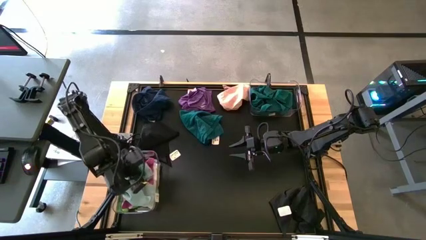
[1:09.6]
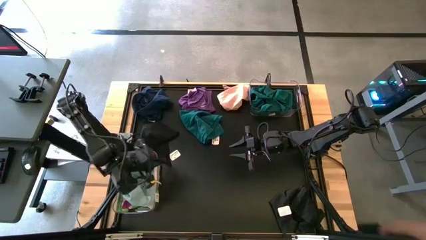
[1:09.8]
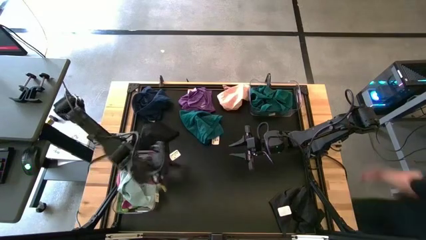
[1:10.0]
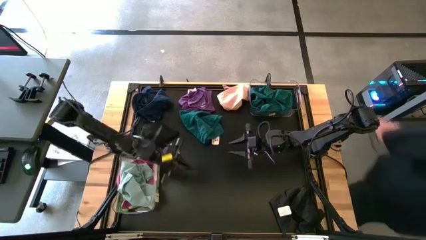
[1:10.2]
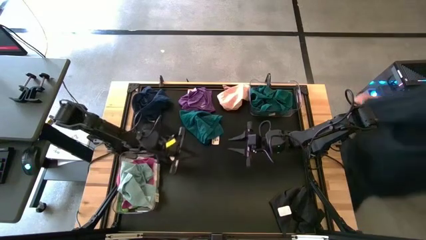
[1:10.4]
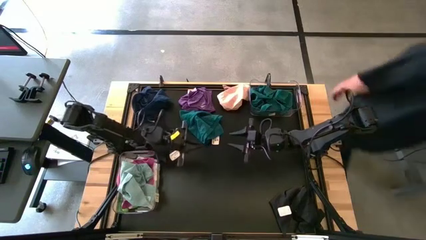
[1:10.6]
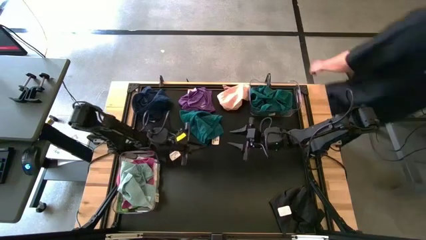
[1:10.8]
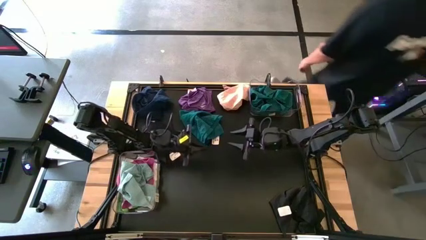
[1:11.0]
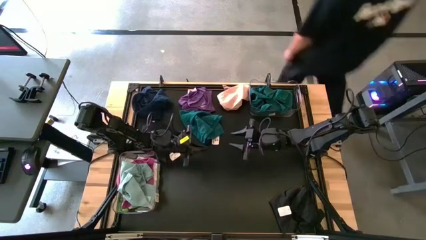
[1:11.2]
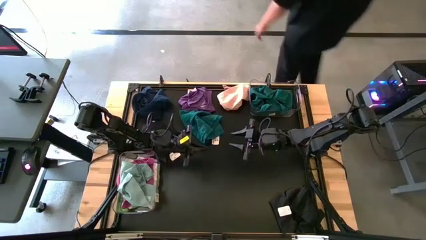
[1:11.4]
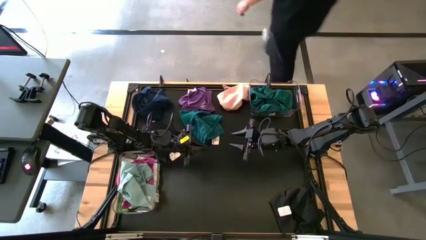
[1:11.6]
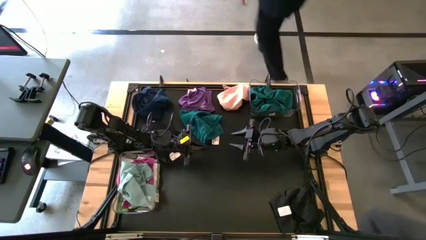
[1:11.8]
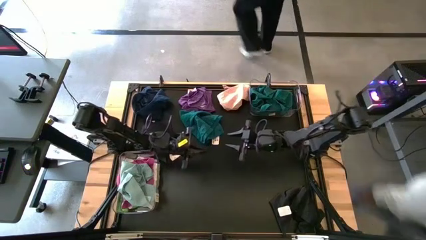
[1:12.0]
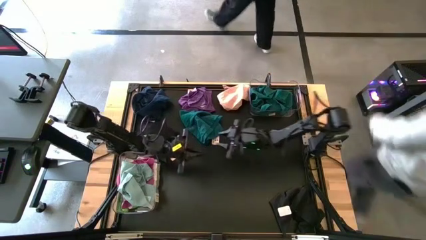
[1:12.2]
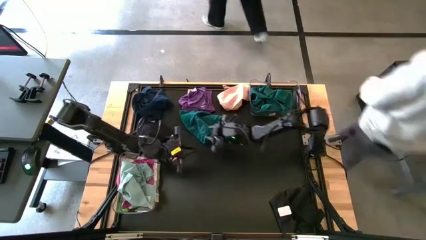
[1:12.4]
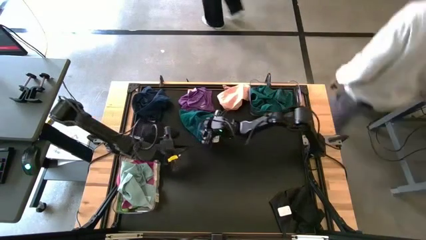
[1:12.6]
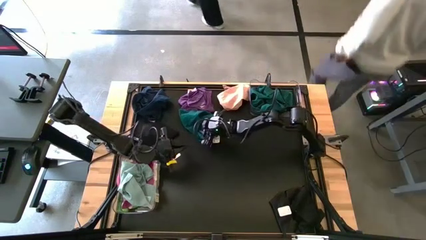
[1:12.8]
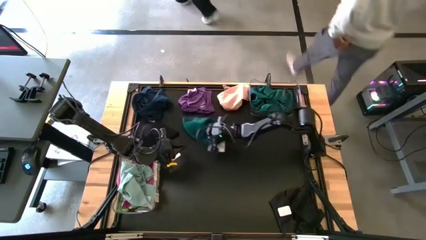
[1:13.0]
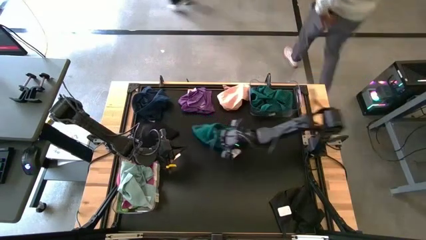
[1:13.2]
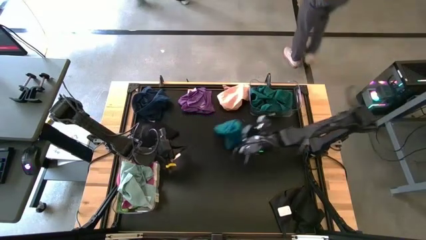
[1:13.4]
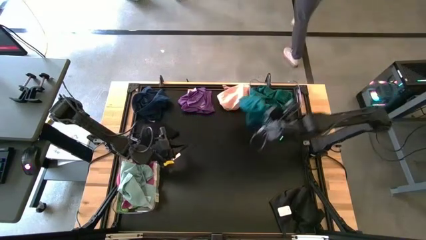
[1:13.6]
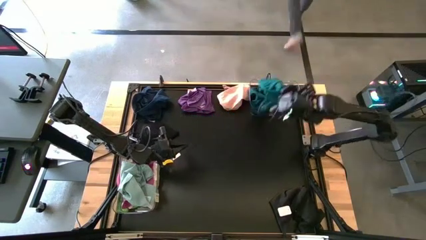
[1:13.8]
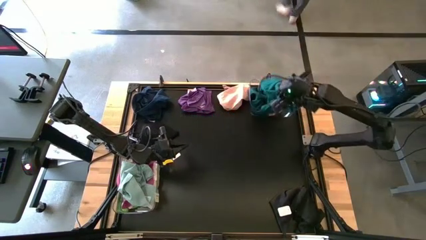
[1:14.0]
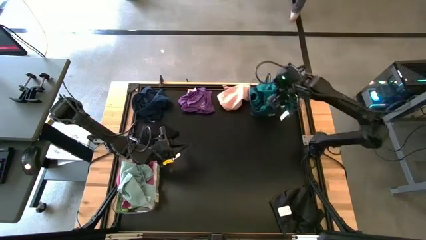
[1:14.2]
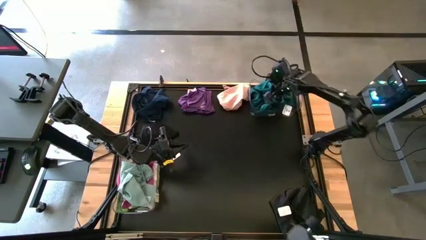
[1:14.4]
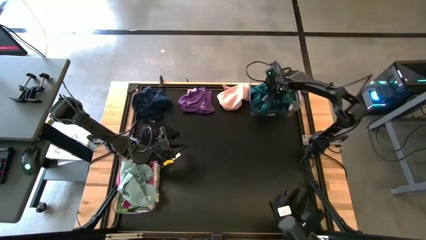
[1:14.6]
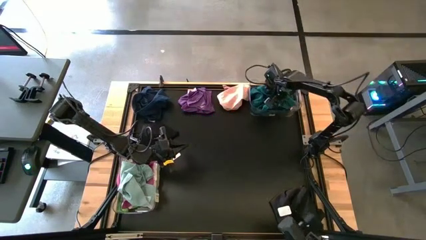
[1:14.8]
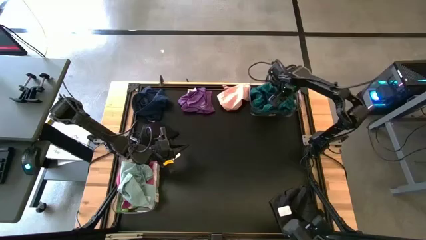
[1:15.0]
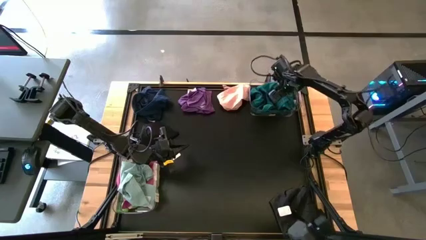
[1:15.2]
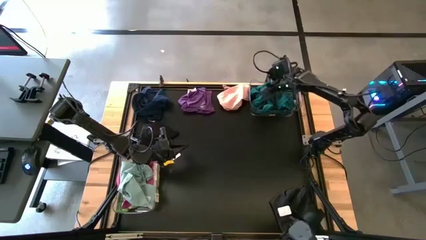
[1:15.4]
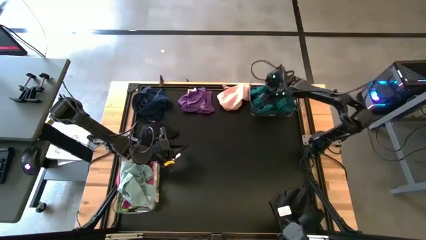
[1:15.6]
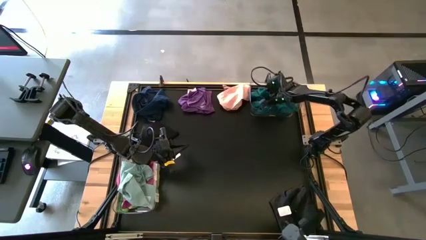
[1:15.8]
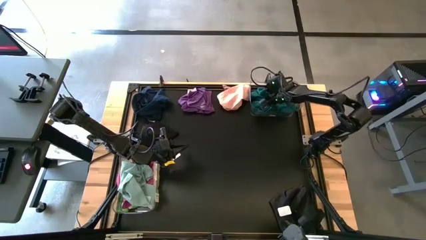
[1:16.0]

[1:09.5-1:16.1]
Task: Sort towels by color in basket
Put the dark green towel into the top transparent bin

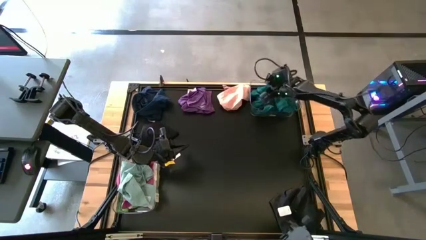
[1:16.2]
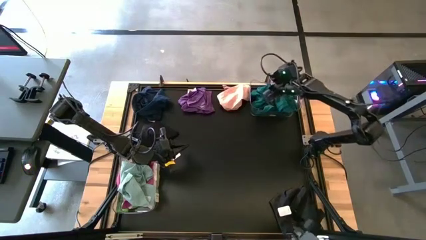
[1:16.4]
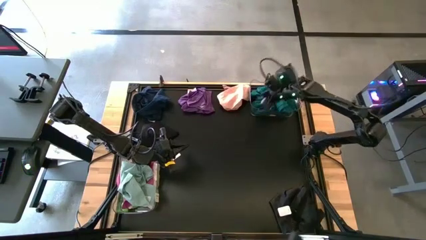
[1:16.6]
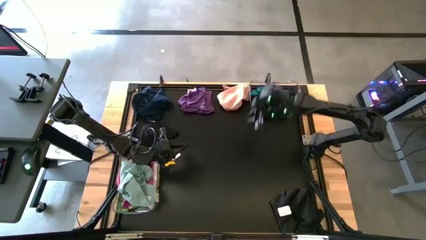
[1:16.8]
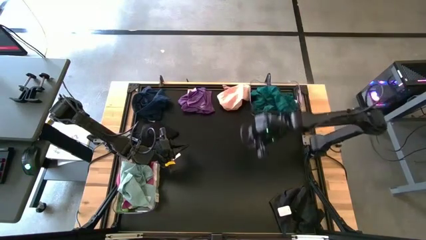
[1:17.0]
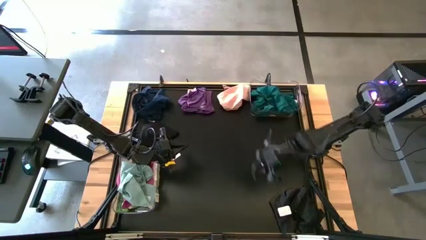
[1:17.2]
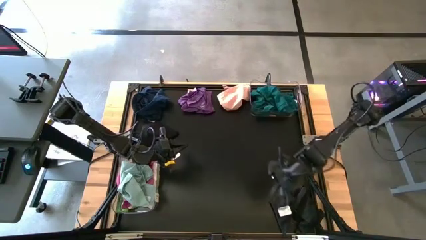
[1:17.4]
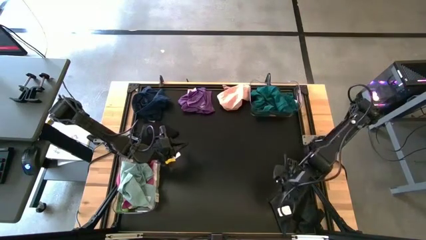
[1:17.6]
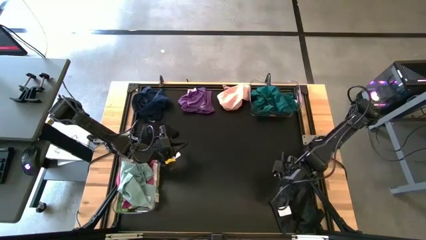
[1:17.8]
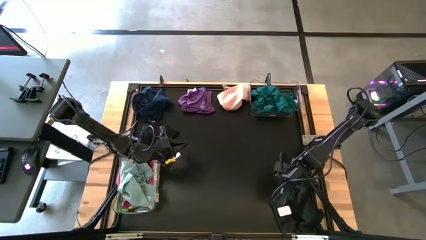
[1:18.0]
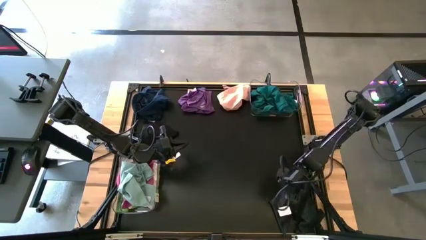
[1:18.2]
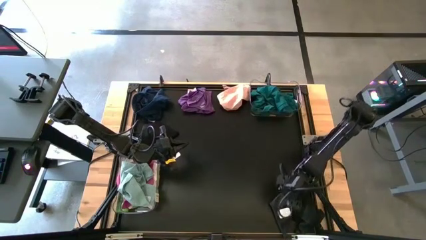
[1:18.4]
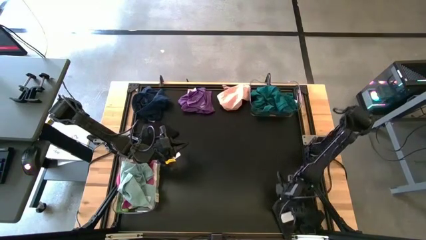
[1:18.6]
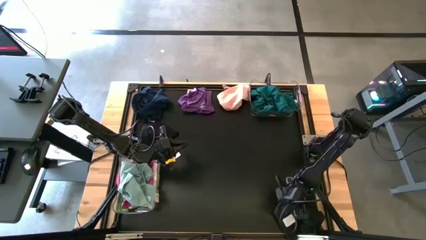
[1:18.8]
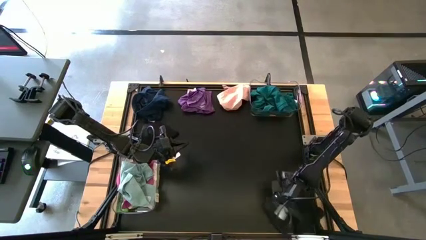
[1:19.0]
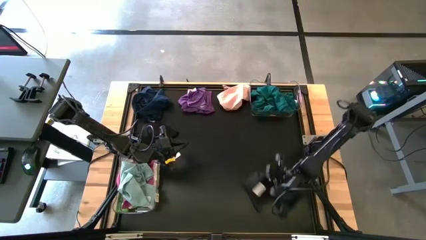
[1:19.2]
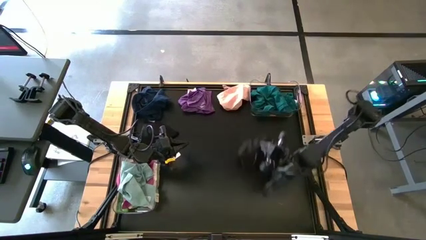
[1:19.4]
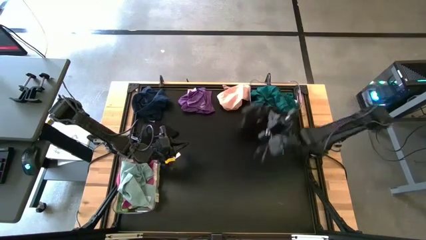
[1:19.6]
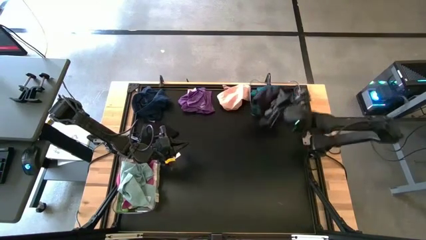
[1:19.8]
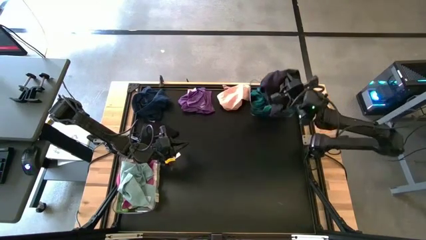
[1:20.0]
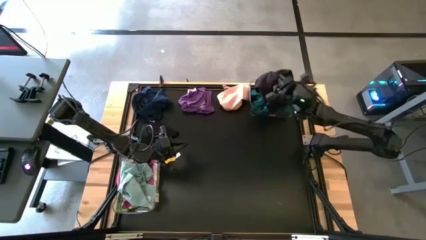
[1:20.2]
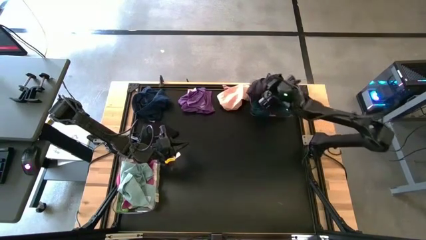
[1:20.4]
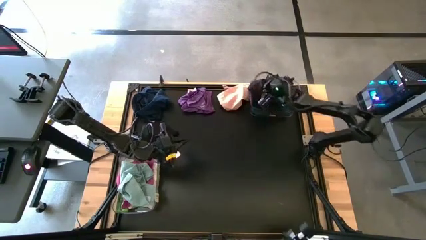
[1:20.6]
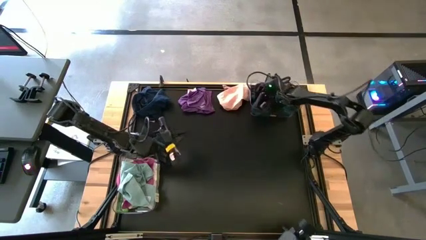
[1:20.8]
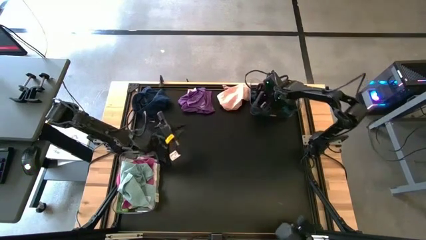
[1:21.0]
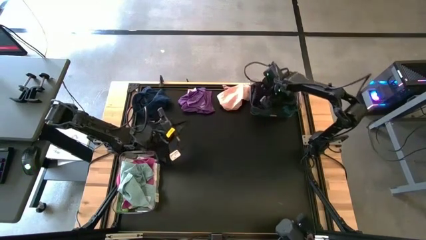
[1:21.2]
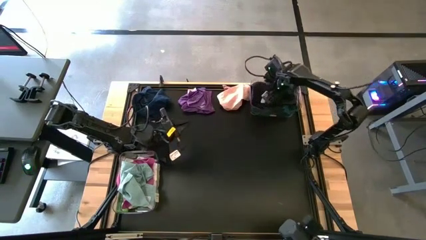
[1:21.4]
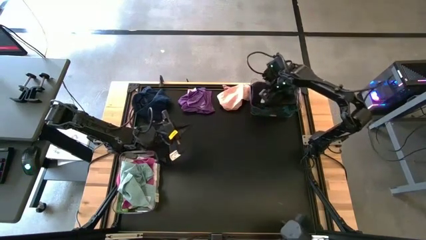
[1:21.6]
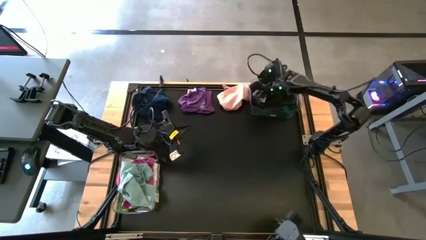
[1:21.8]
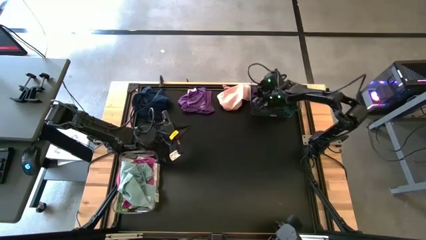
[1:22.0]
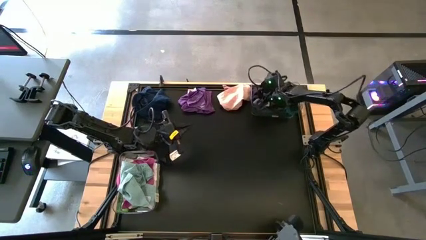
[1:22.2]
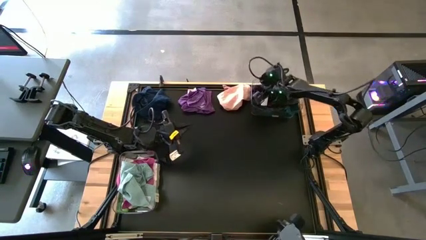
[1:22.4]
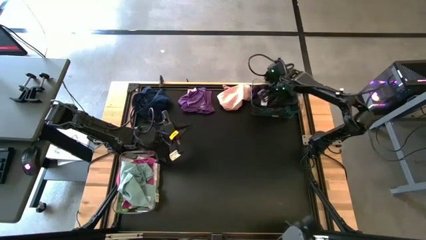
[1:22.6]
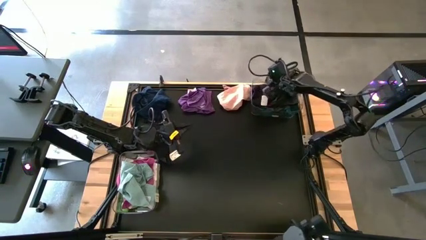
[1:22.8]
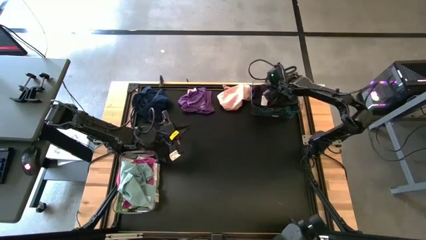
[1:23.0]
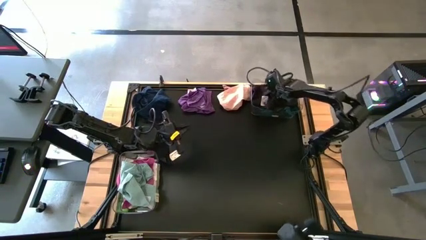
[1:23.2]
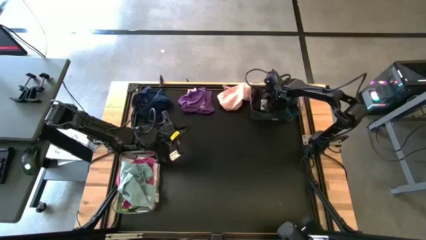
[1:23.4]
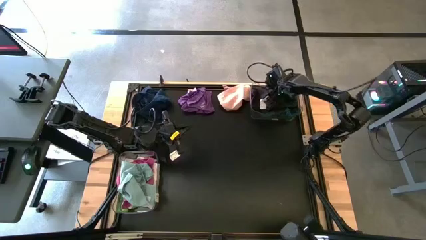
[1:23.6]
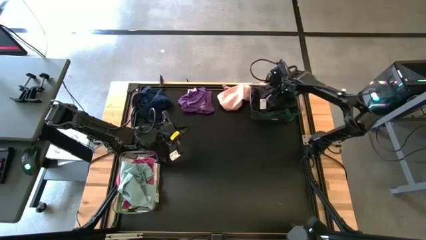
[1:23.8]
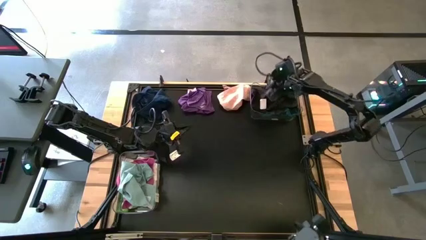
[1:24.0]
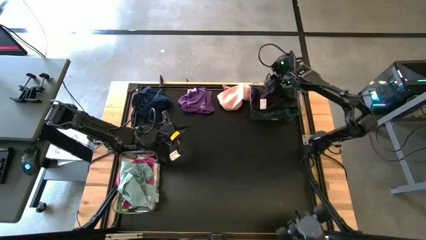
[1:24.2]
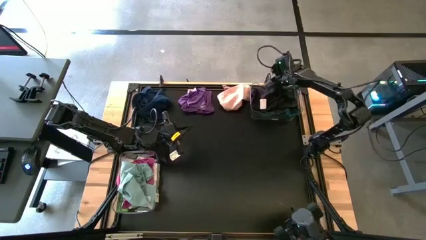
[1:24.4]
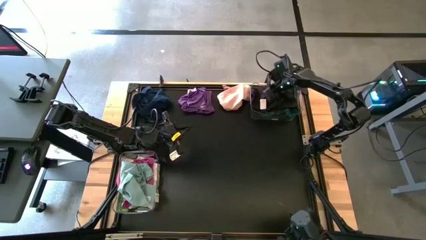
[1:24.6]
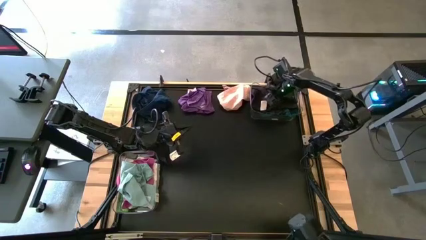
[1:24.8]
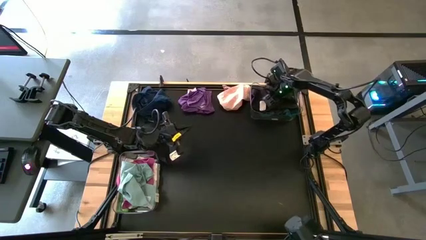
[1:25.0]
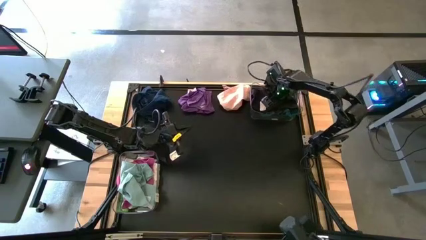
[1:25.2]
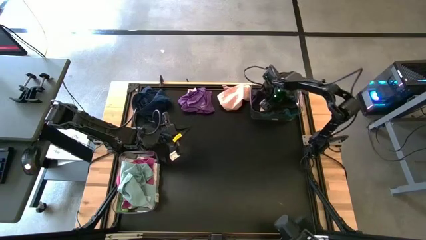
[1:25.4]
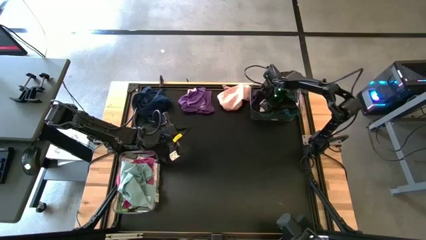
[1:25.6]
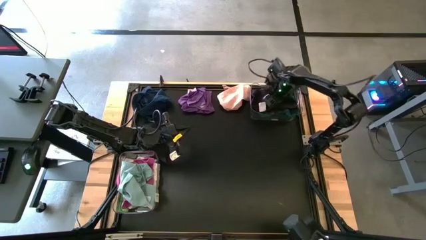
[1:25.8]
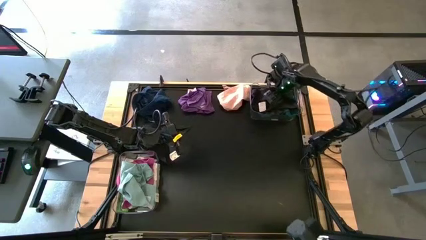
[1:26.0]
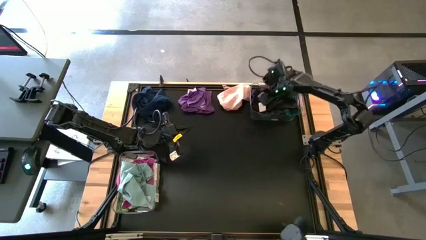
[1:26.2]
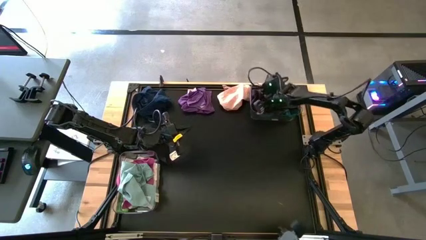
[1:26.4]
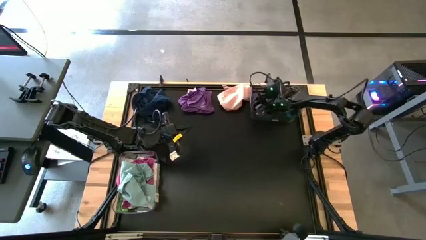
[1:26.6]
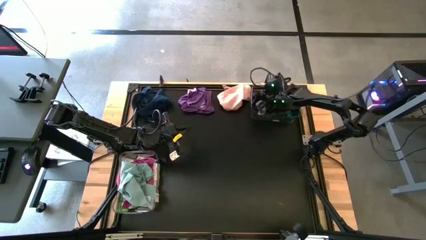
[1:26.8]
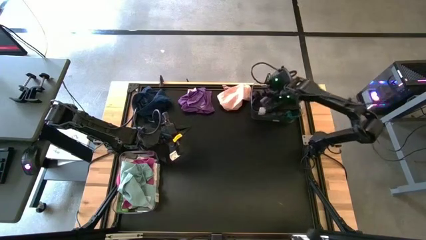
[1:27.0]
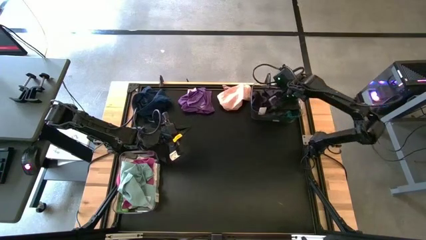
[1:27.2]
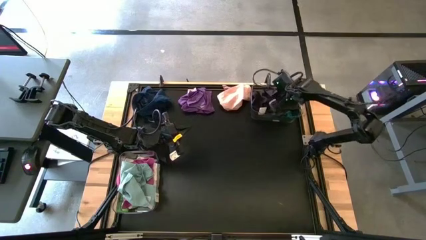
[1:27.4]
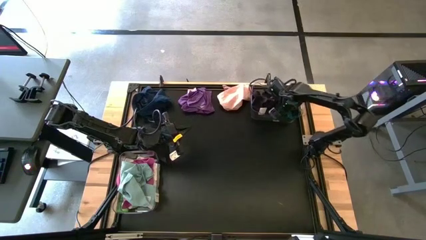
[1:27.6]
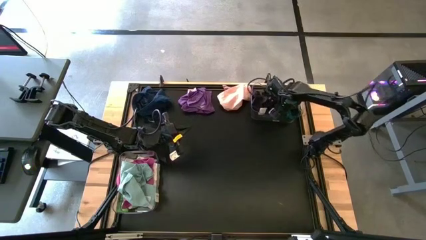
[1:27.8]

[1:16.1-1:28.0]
Put the bottom black towel into the top transparent bin
